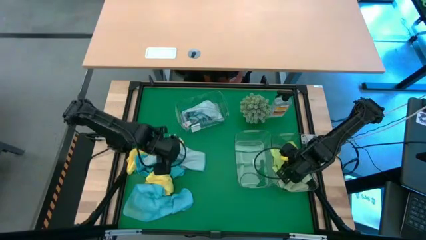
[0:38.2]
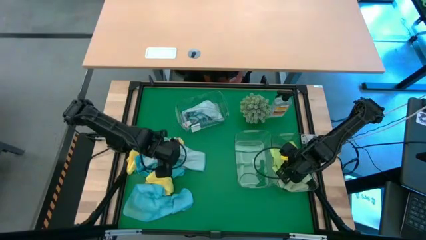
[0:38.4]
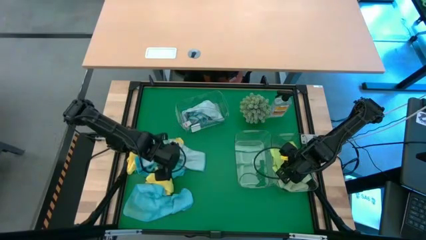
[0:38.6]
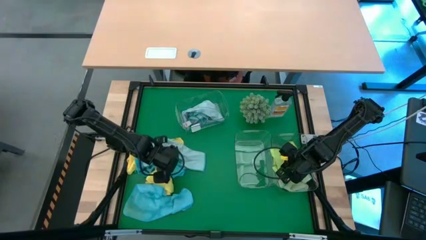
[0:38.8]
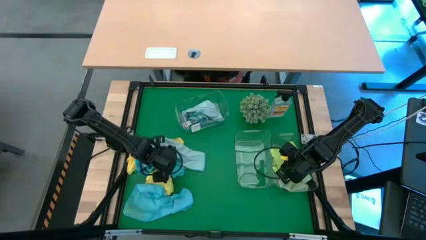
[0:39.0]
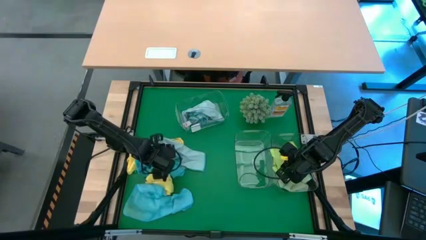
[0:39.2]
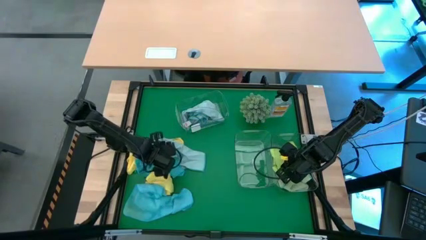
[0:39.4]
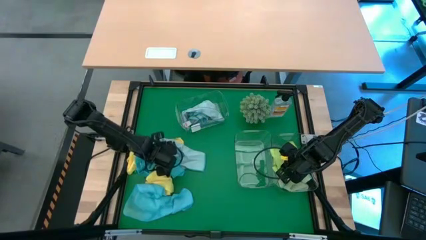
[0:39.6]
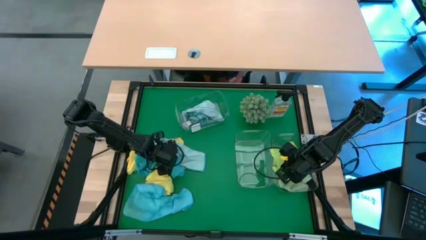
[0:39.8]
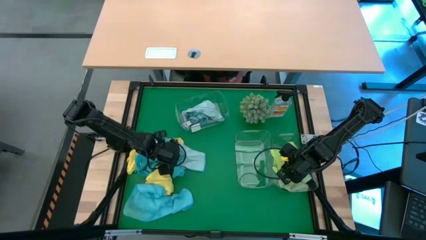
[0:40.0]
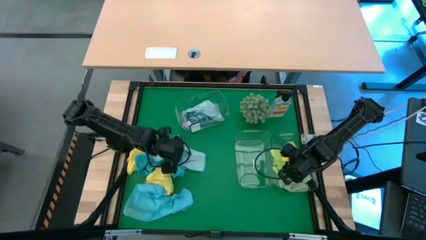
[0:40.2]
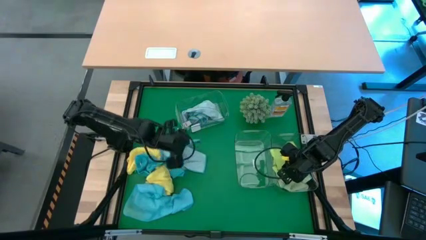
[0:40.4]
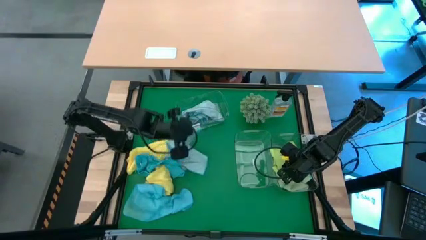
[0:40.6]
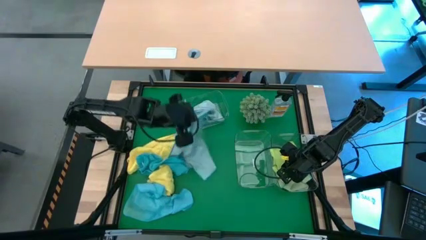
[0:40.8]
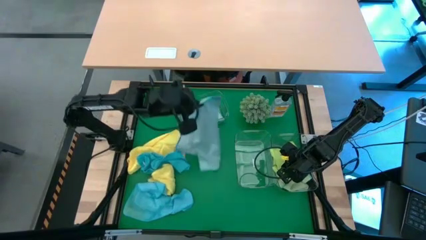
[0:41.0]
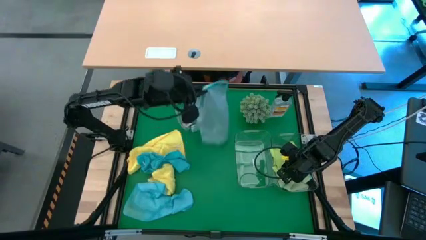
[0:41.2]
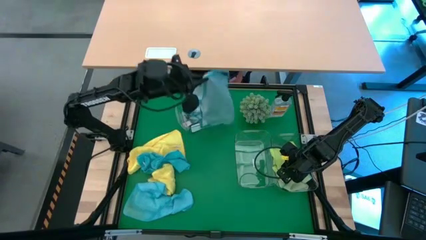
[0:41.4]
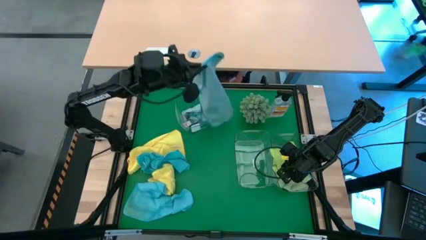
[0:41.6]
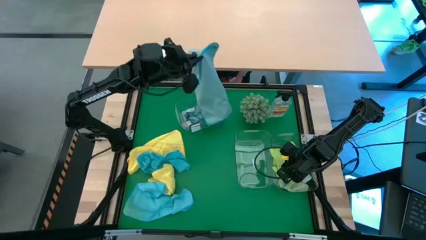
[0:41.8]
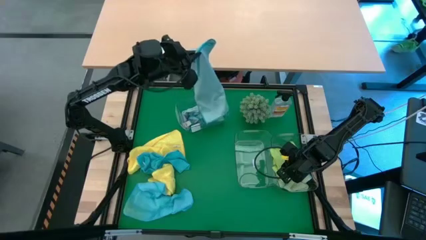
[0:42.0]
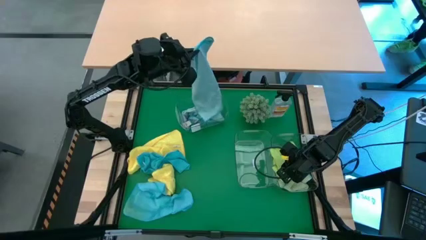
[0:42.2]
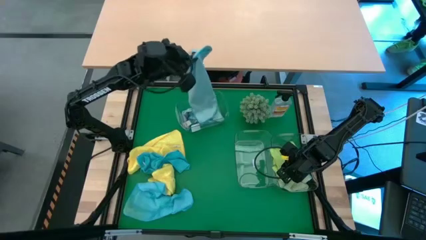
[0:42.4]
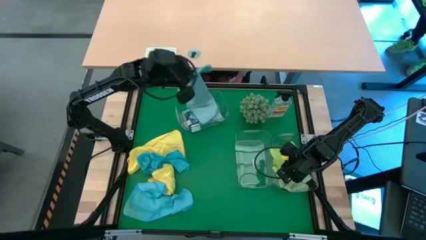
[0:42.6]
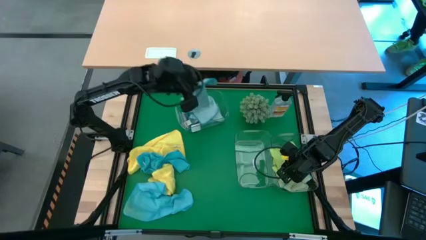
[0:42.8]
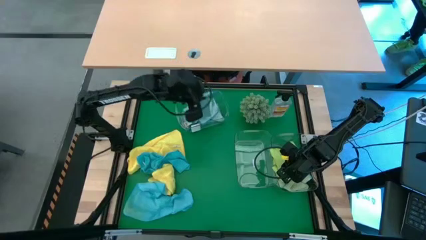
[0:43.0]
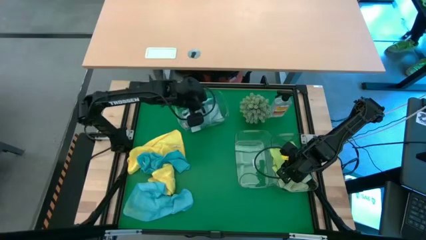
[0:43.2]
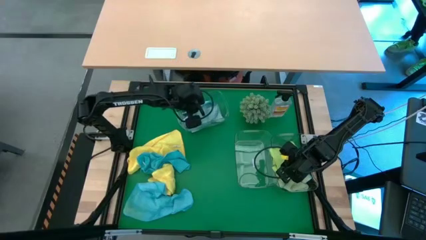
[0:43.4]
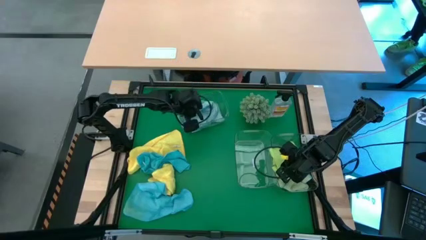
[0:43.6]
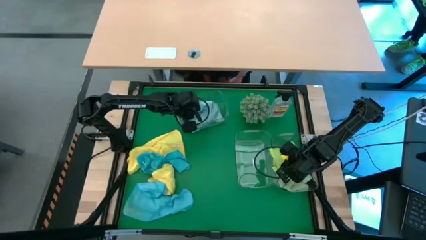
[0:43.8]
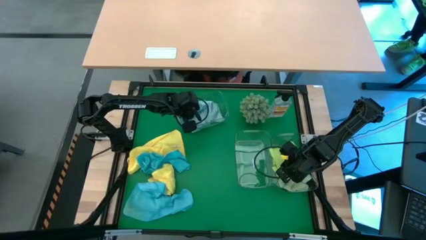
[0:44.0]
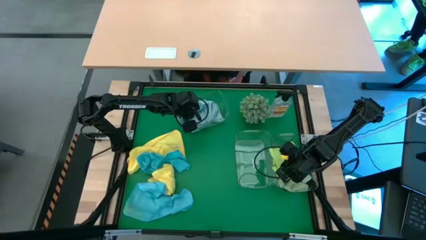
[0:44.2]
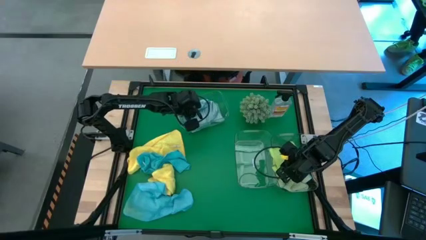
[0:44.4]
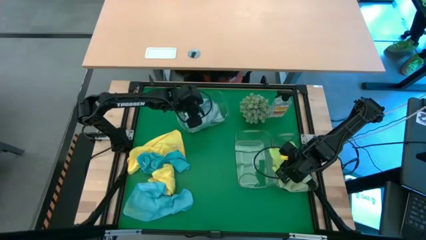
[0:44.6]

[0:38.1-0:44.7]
Task: Sort microfiber towel by color & place in baskets
Put the top blue towel into the top transparent bin

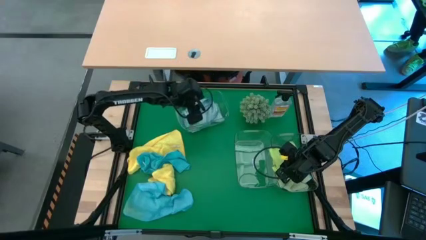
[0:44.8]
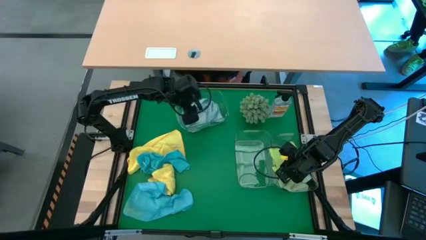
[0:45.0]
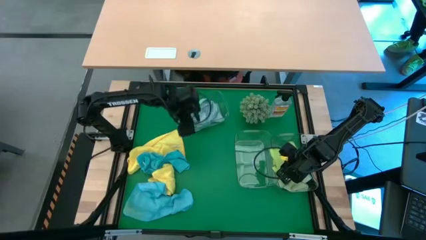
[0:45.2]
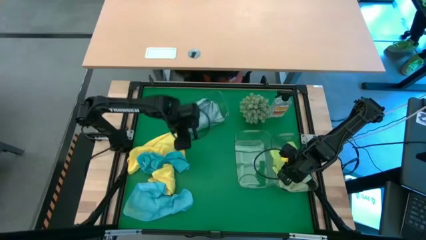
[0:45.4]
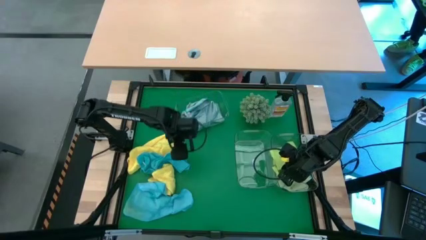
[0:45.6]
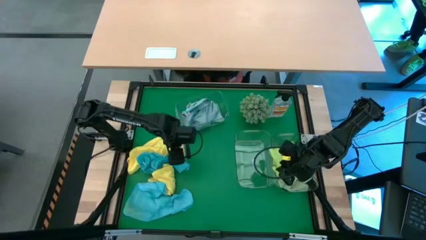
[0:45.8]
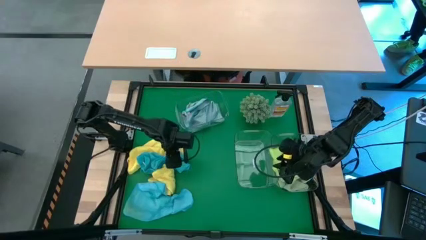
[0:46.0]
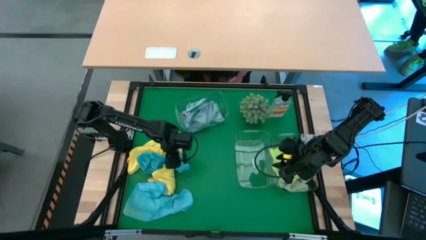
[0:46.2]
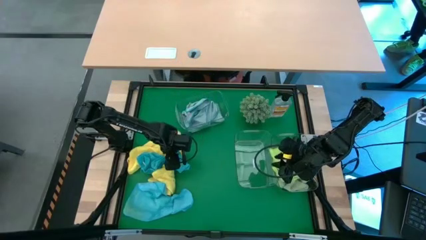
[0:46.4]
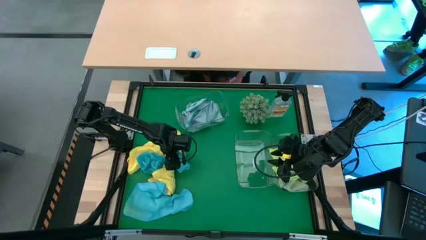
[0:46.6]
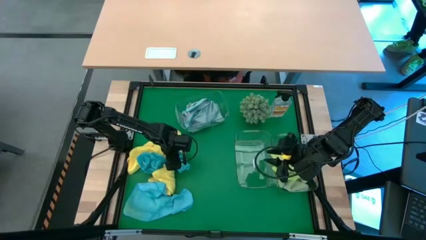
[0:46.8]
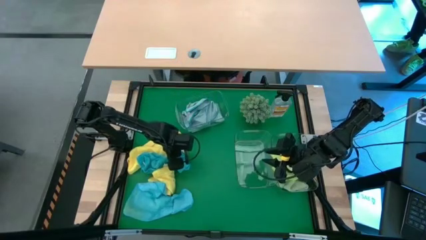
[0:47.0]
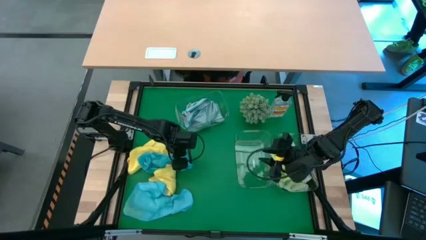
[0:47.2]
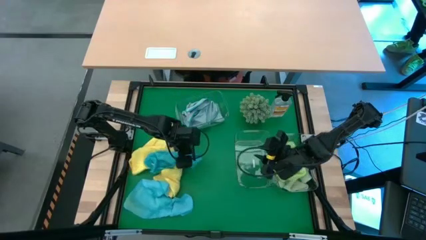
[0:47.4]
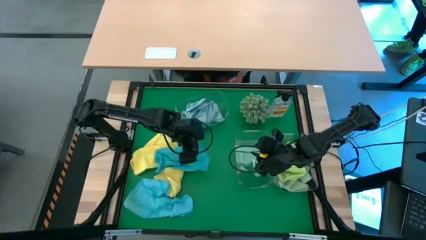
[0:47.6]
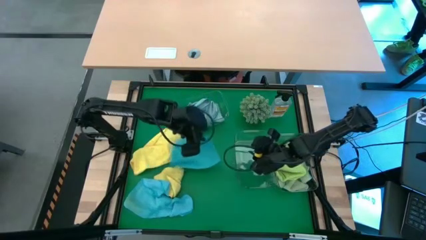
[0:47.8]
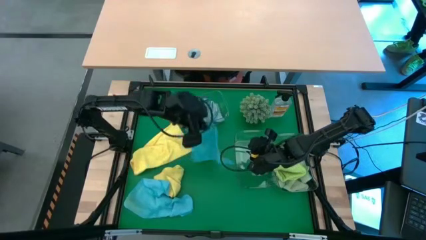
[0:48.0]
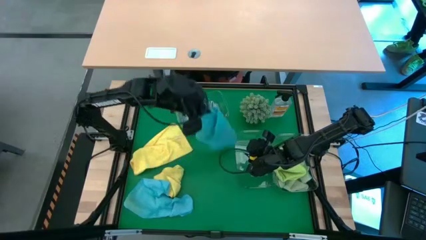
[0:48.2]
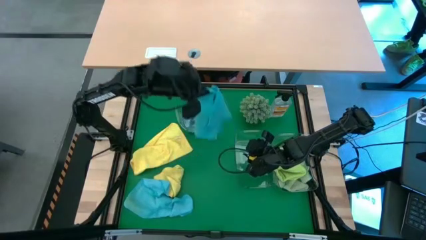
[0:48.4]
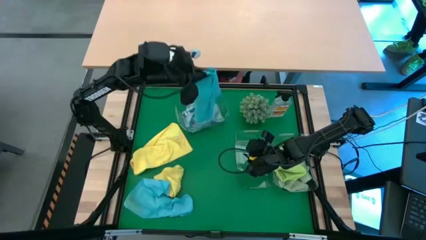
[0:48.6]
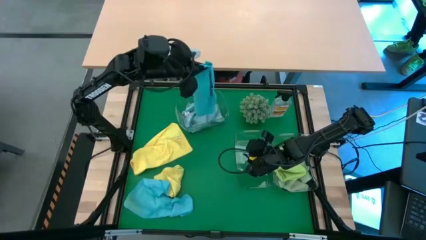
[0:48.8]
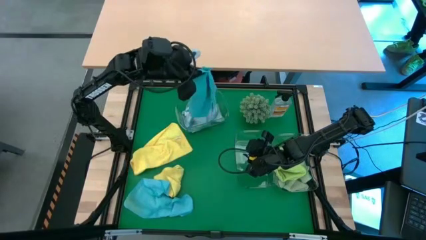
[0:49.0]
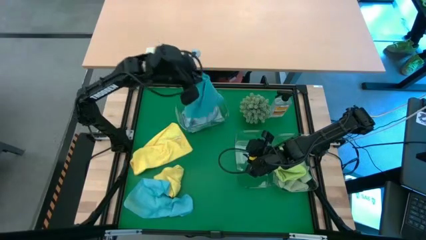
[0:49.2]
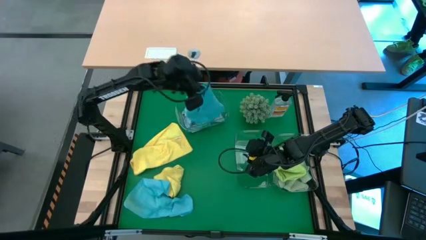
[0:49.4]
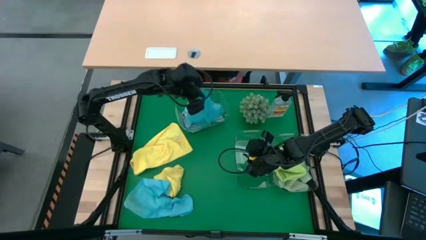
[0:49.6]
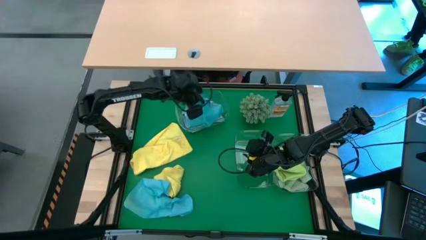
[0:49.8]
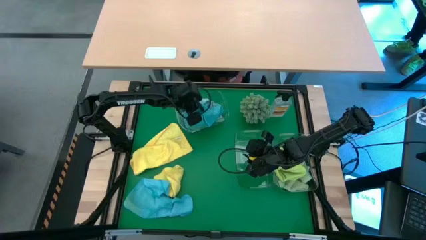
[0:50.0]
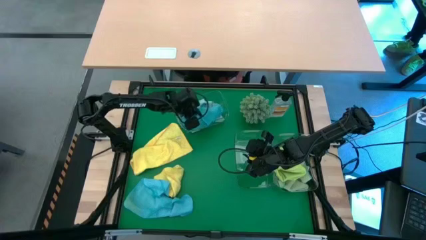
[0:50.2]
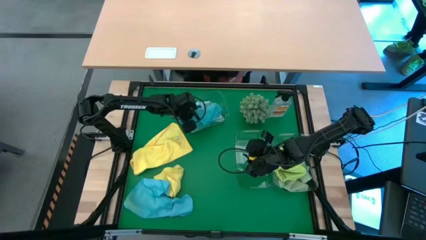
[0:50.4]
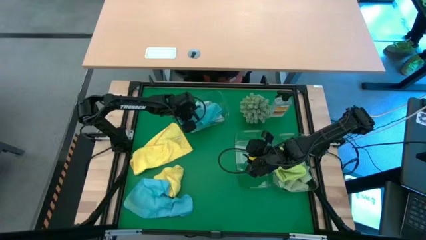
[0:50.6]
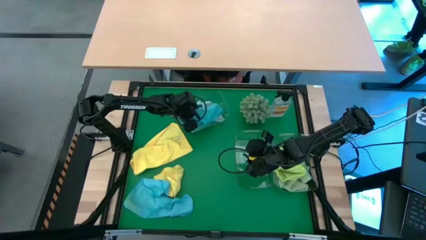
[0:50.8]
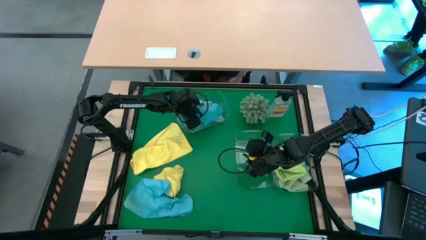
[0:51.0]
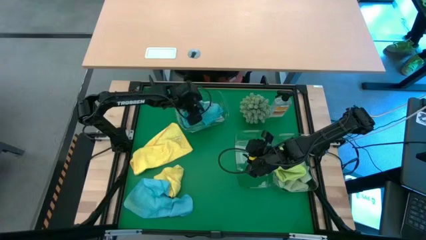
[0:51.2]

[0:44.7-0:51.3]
Put the top blue towel into the top transparent bin
